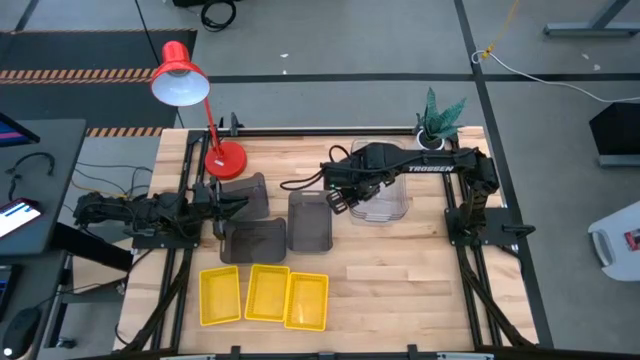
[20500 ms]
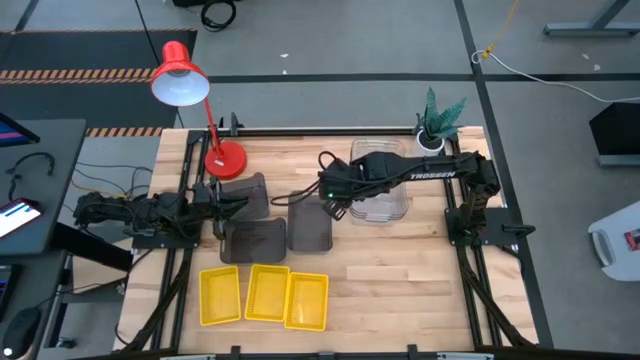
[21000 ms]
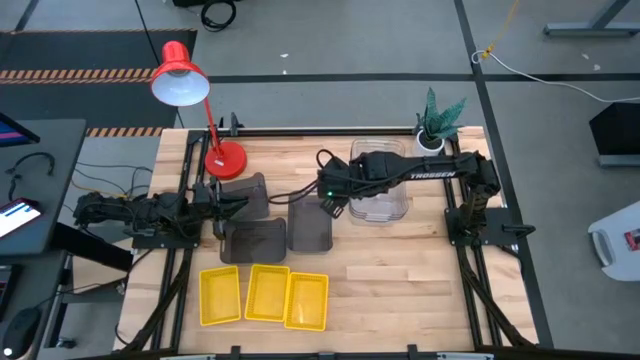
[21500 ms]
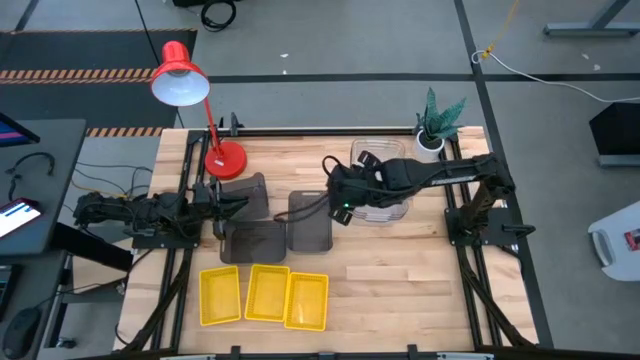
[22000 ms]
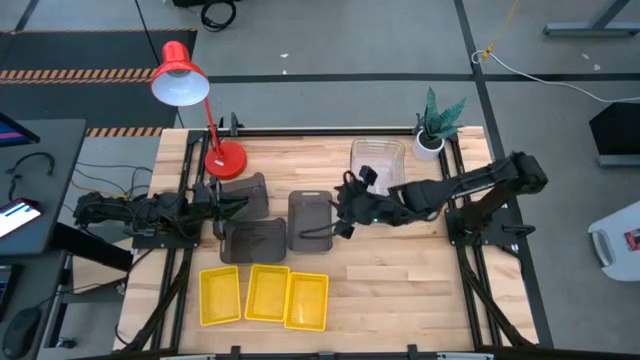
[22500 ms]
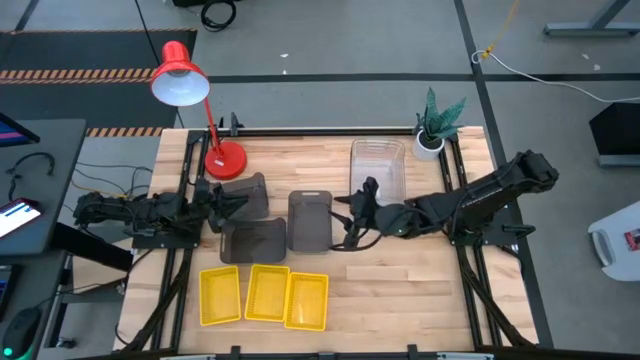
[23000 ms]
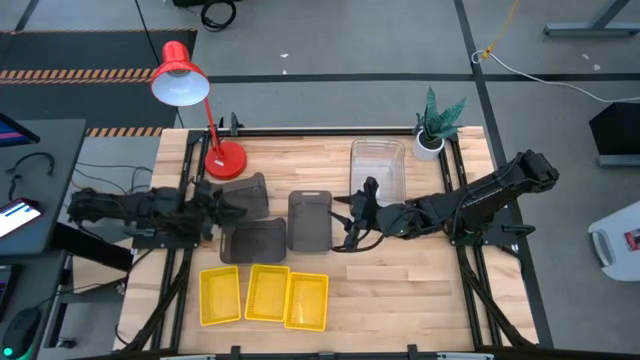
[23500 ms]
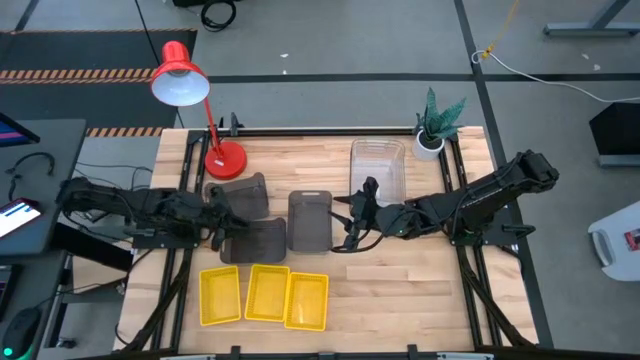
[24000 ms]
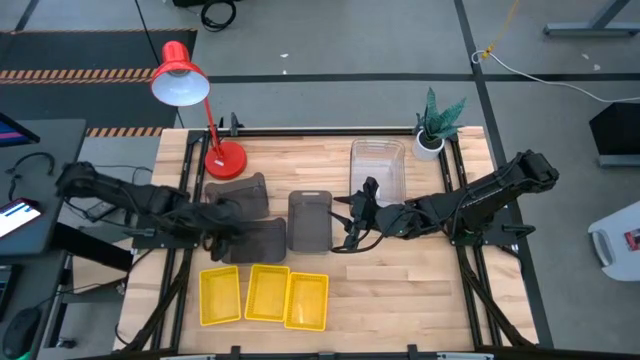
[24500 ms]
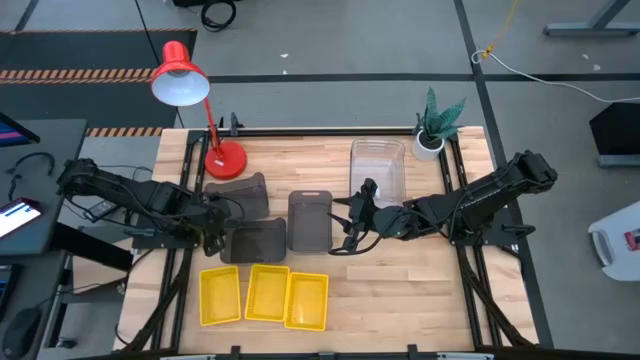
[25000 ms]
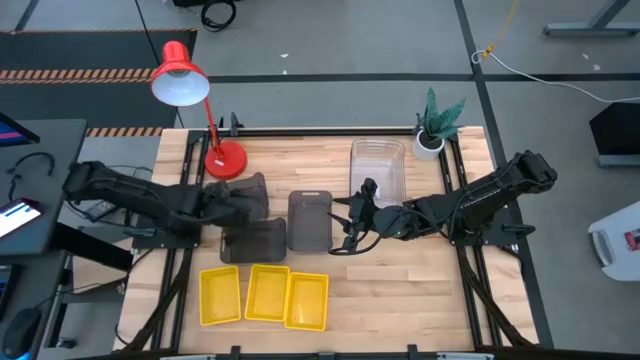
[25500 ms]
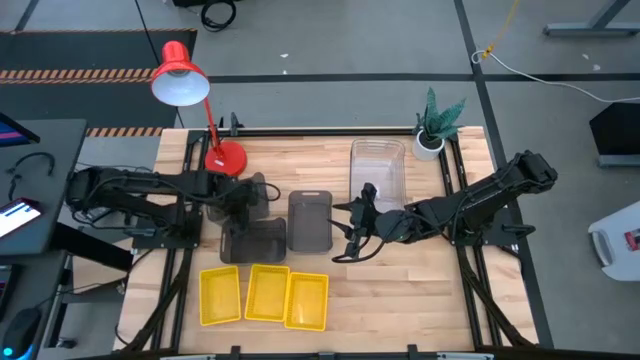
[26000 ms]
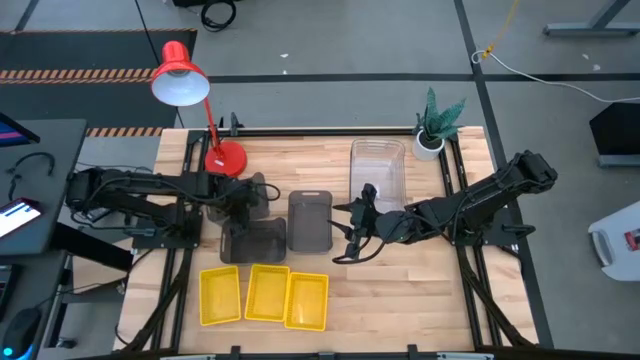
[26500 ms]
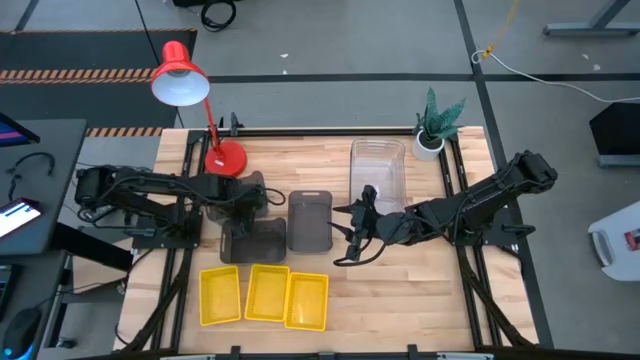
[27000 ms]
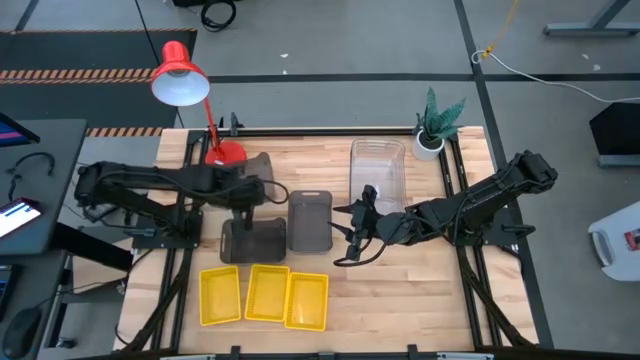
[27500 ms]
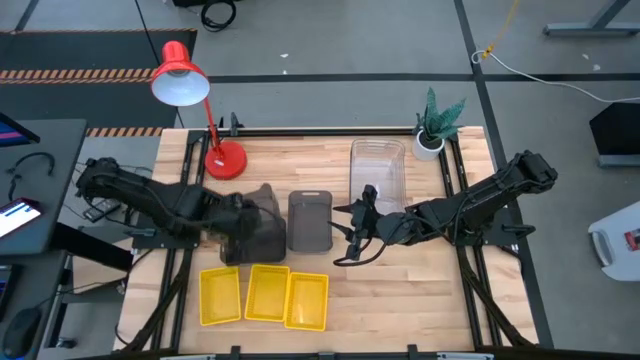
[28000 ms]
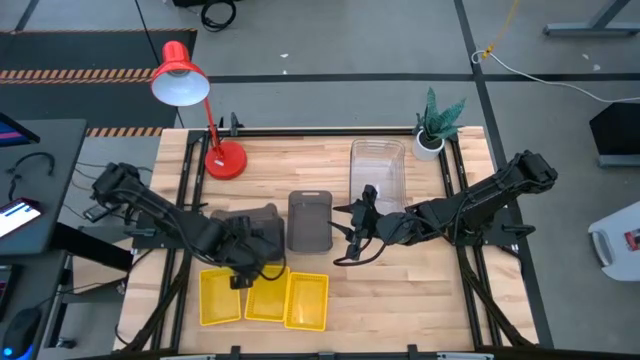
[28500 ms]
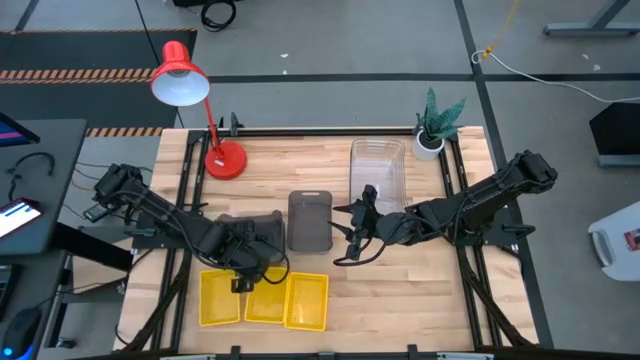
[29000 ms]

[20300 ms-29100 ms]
Stack the top black bin on the left black bin

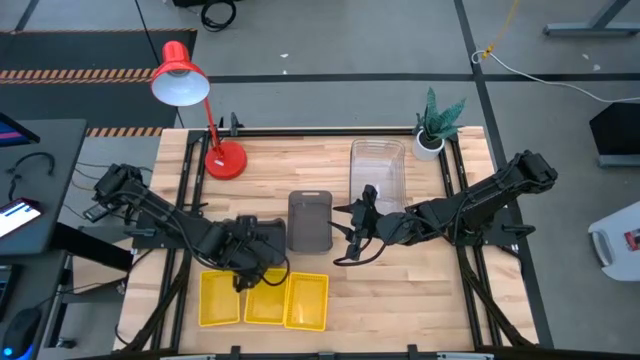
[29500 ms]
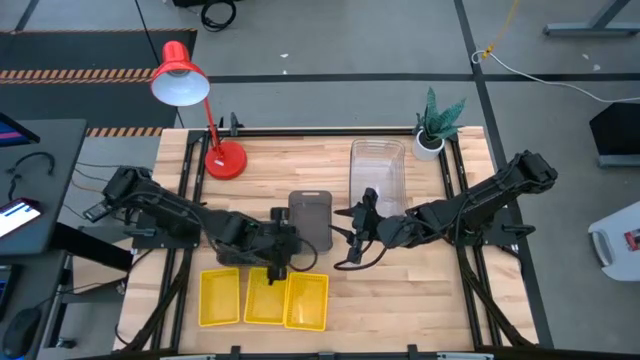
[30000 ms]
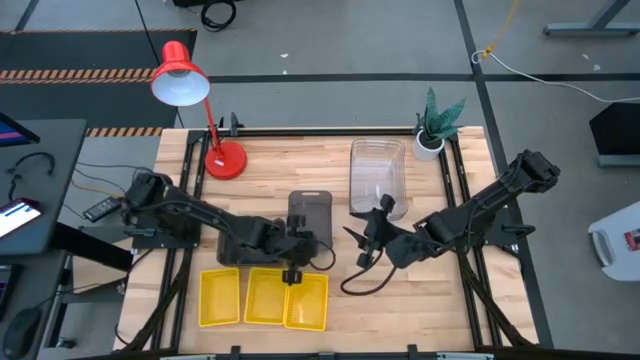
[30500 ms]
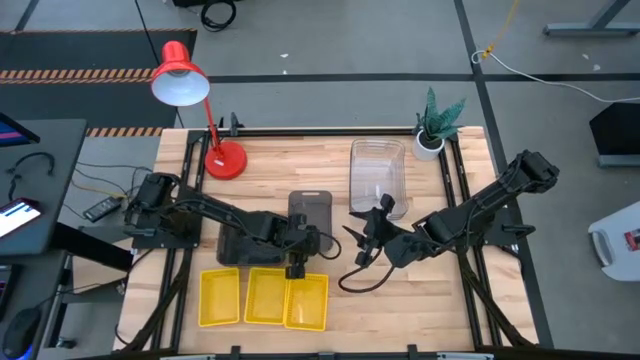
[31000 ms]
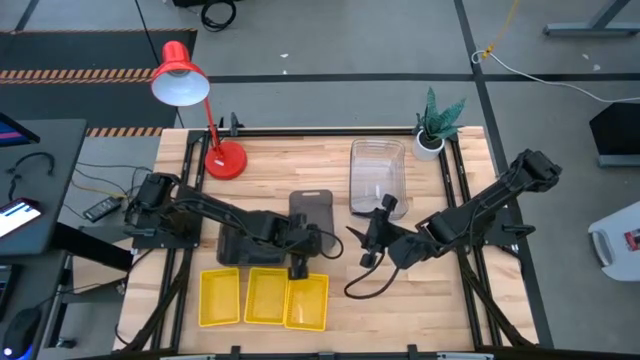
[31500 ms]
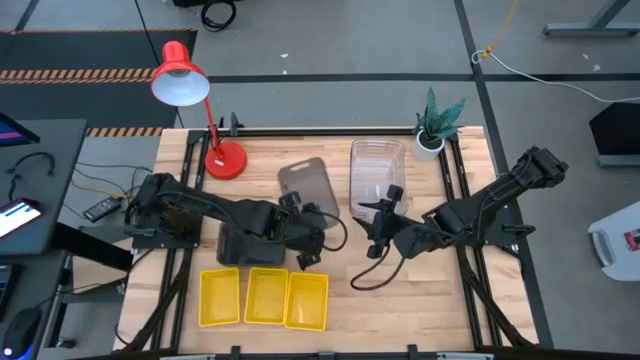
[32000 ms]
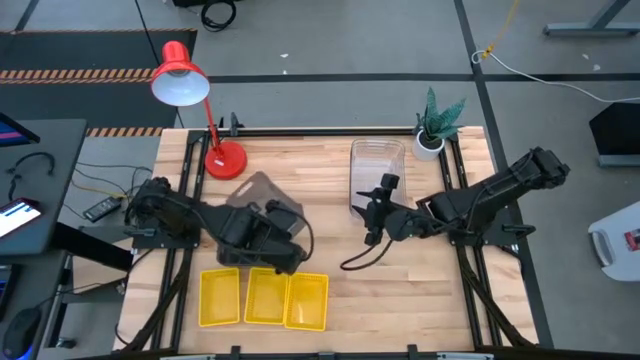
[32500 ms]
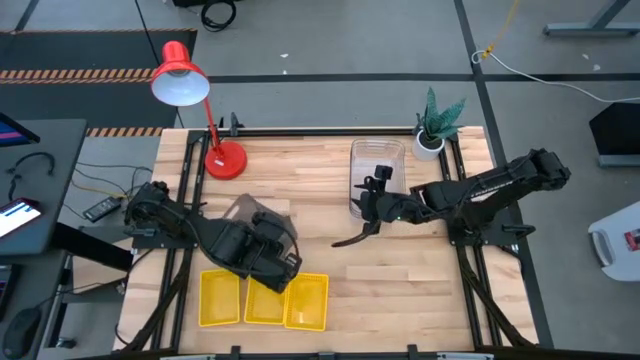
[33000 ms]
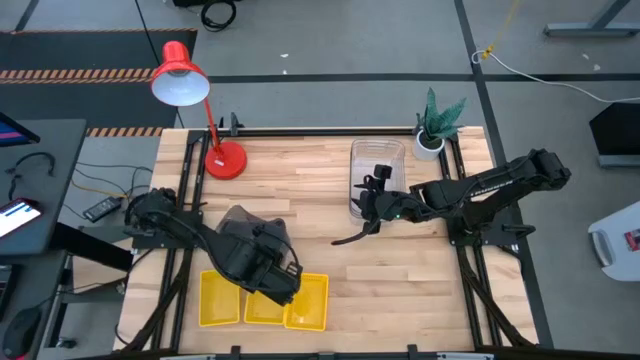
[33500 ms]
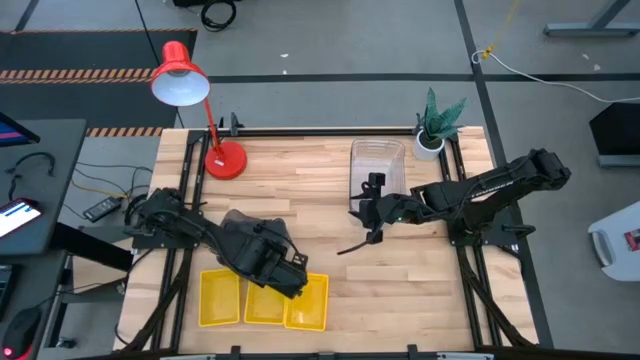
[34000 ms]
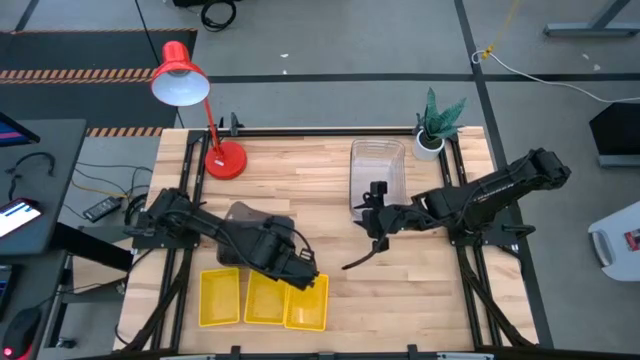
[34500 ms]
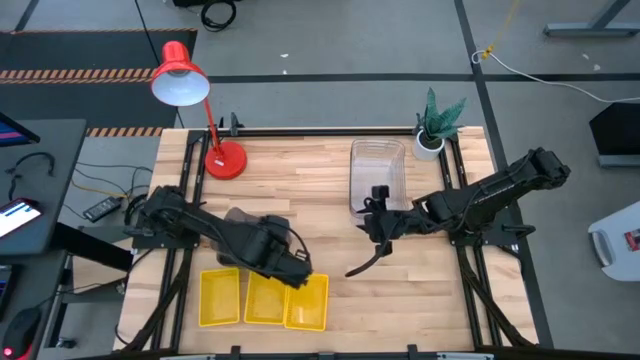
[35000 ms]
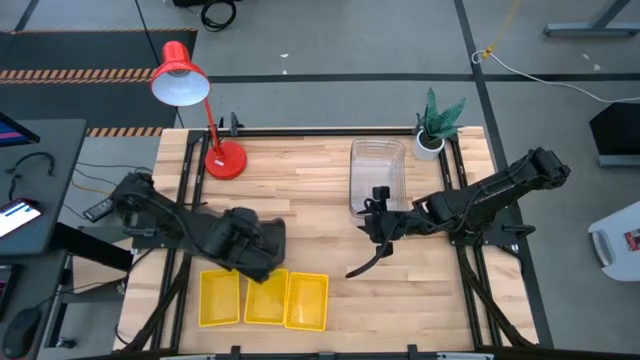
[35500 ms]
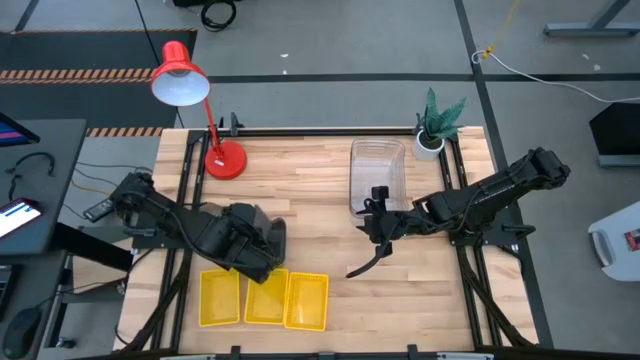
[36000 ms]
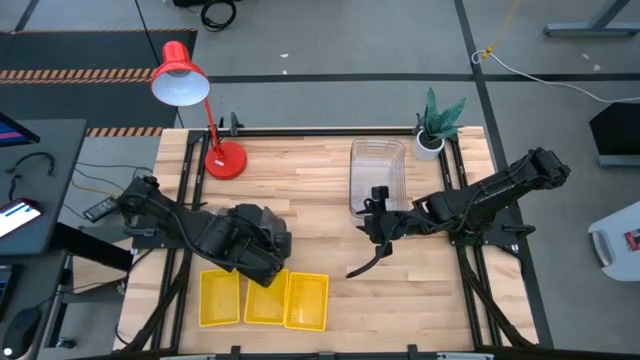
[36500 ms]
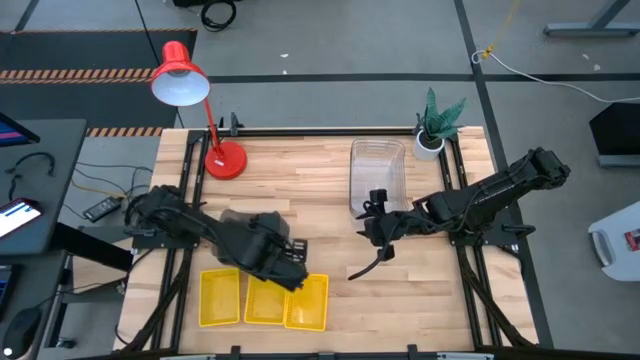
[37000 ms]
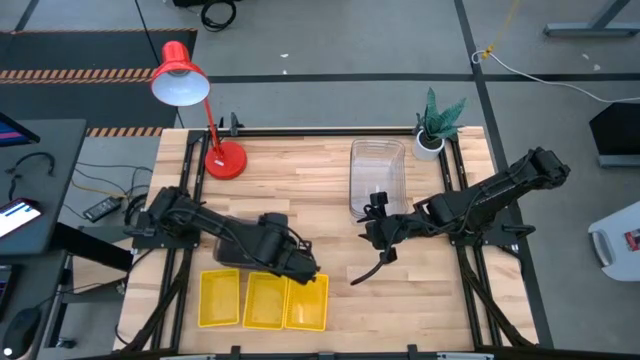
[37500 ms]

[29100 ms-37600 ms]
Stack the right black bin on the left black bin

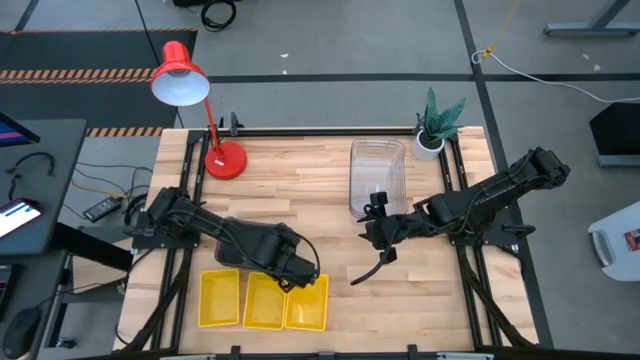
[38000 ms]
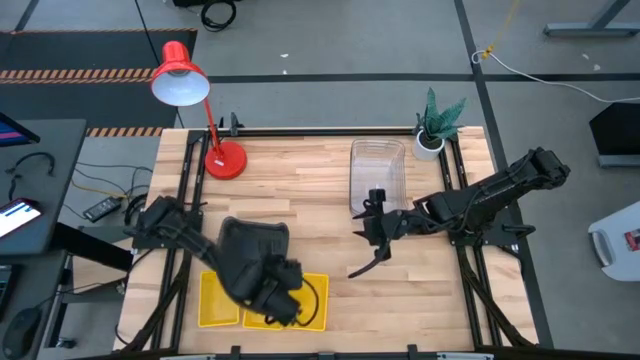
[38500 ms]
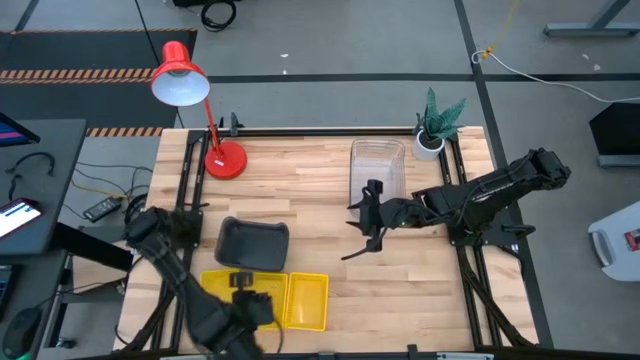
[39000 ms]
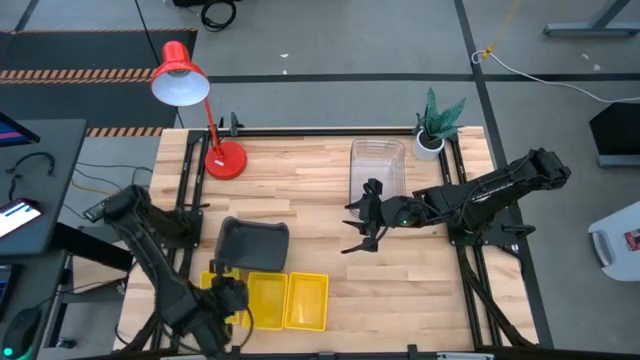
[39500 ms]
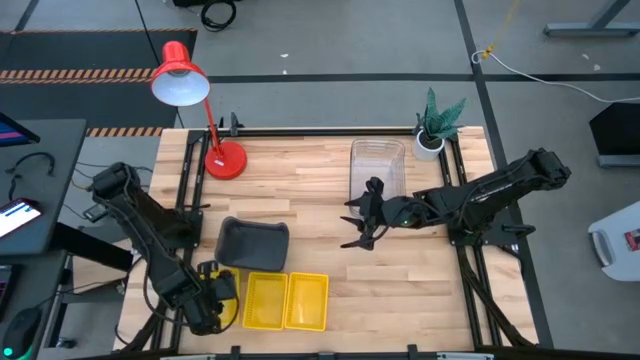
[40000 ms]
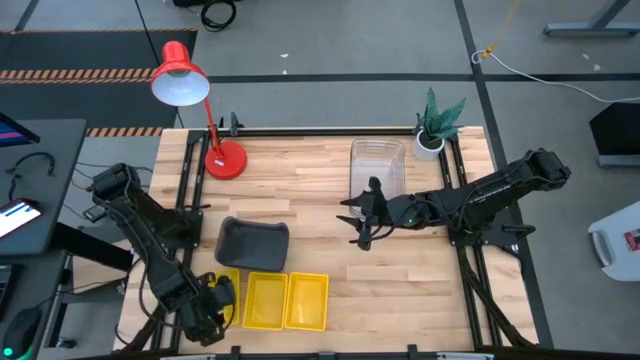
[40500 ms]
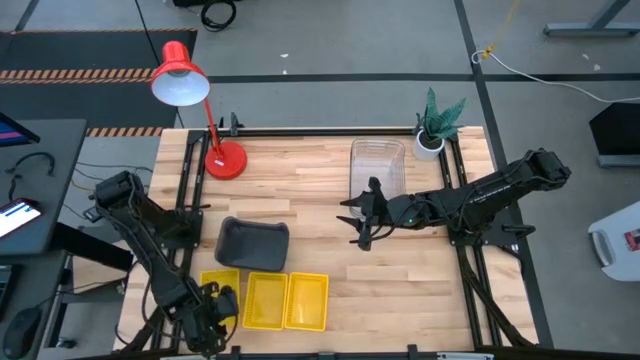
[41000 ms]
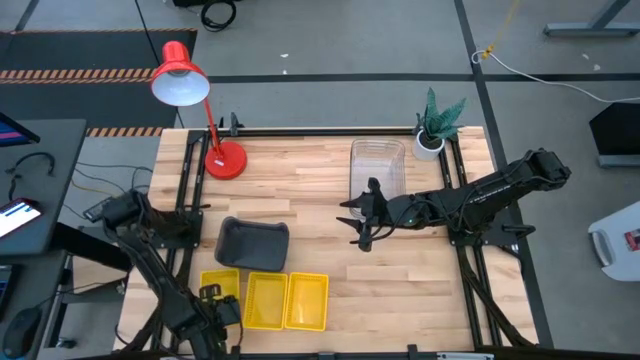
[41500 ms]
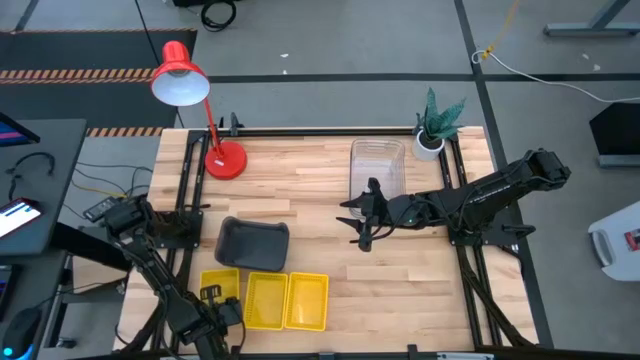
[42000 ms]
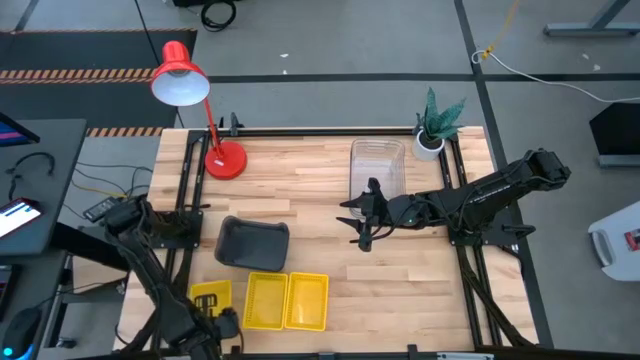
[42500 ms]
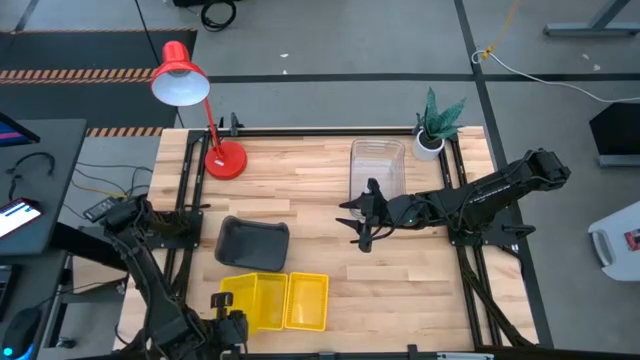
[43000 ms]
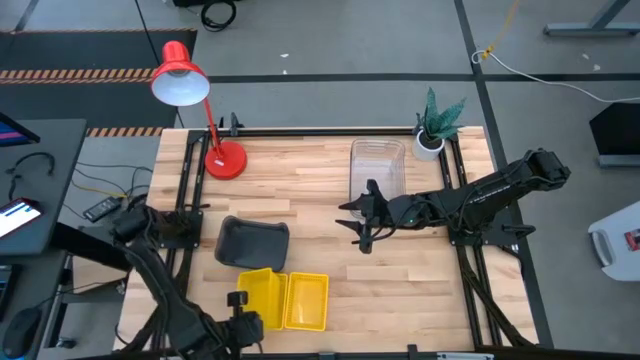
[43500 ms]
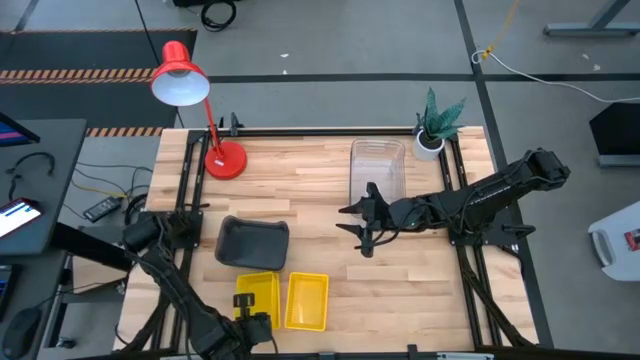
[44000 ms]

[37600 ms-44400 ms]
Stack the left yellow bin on the middle yellow bin
